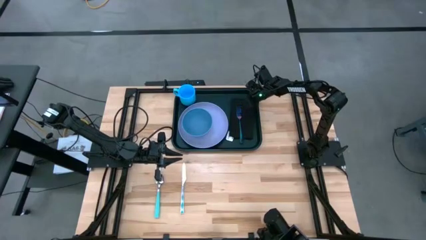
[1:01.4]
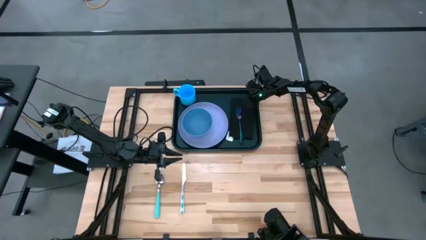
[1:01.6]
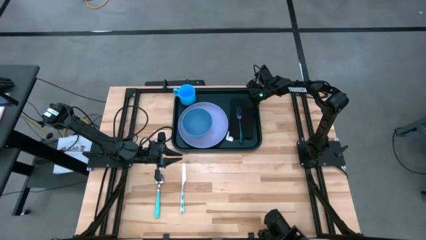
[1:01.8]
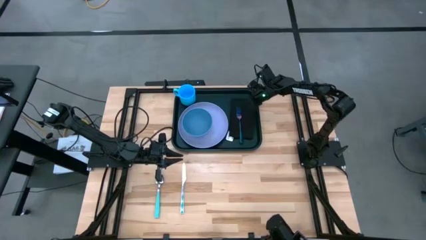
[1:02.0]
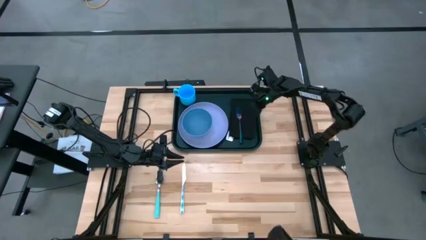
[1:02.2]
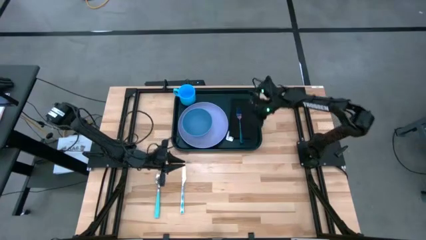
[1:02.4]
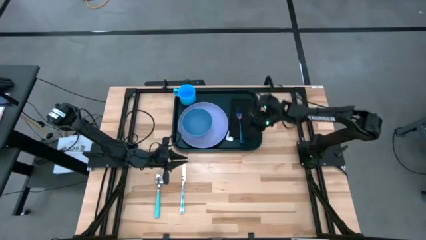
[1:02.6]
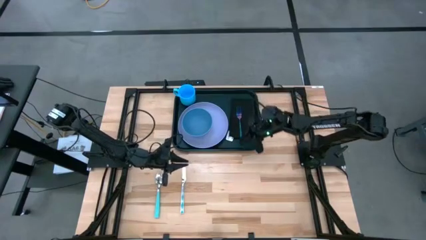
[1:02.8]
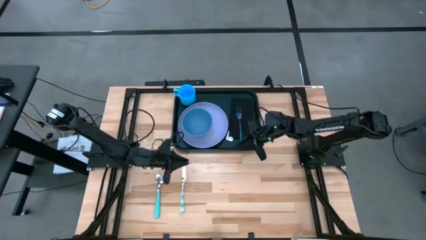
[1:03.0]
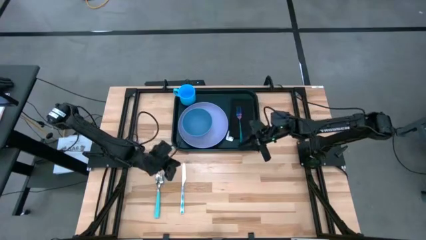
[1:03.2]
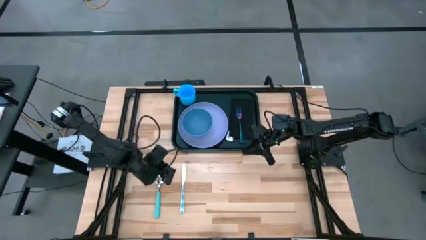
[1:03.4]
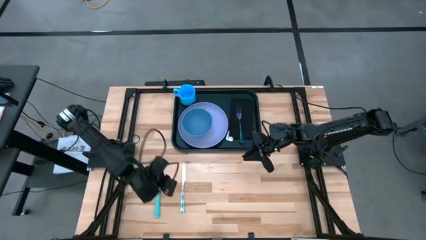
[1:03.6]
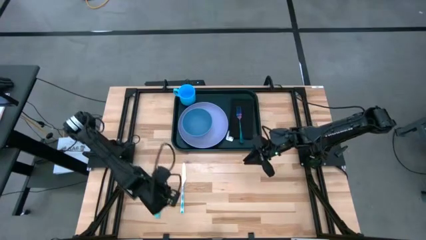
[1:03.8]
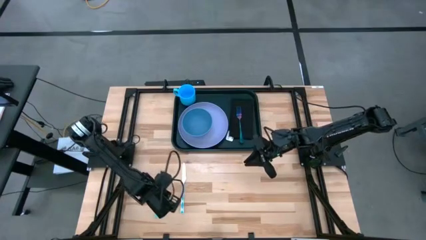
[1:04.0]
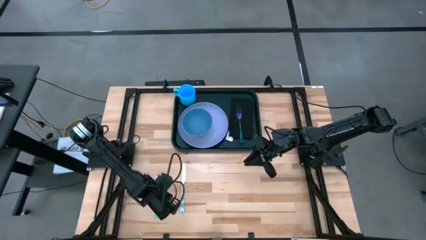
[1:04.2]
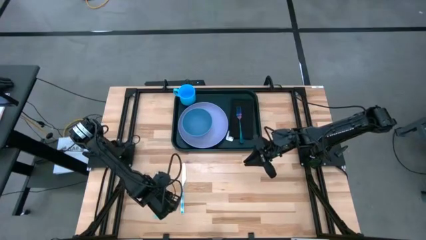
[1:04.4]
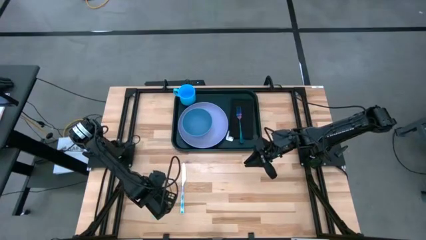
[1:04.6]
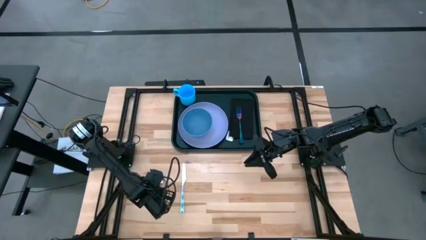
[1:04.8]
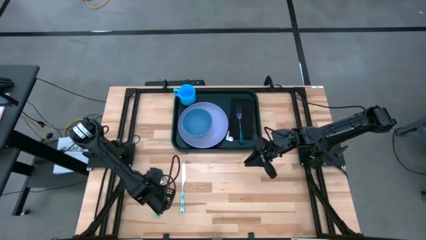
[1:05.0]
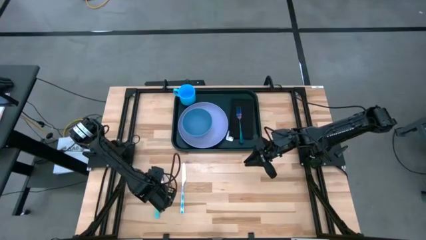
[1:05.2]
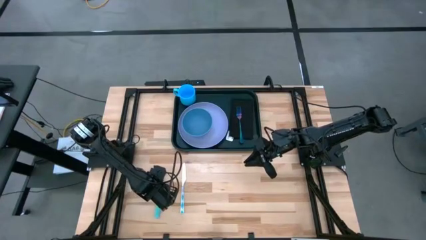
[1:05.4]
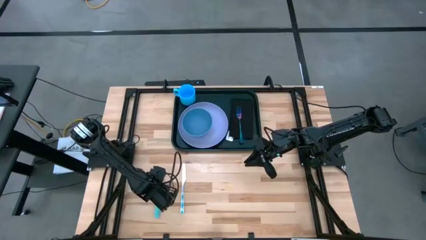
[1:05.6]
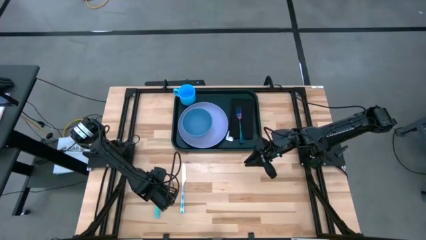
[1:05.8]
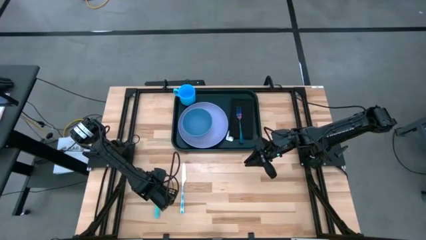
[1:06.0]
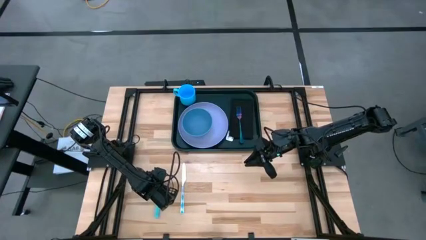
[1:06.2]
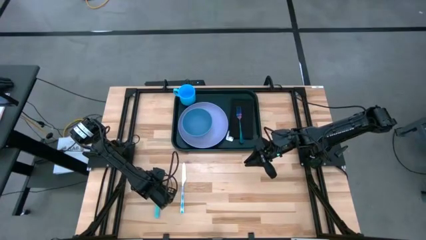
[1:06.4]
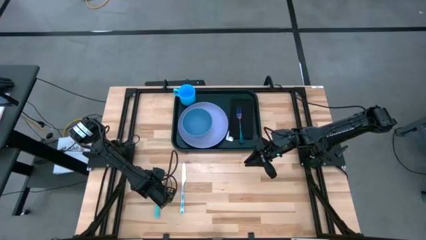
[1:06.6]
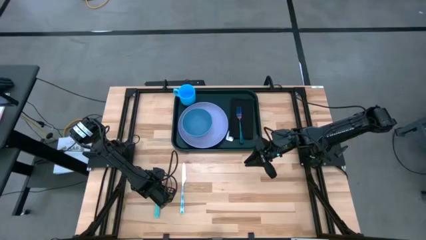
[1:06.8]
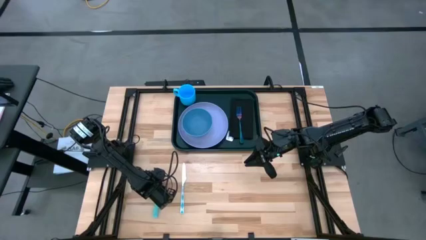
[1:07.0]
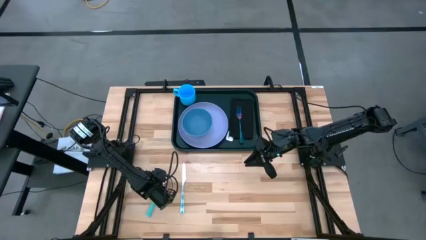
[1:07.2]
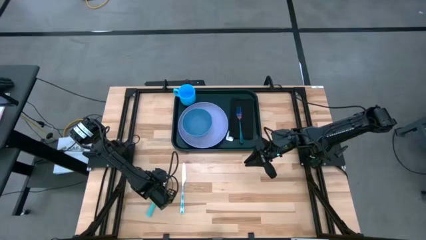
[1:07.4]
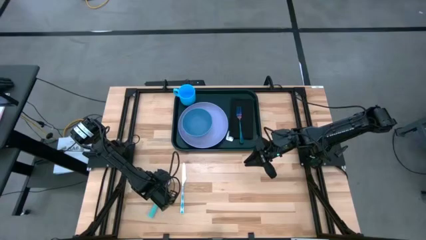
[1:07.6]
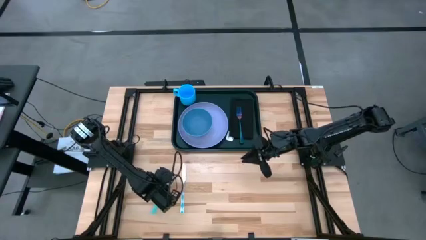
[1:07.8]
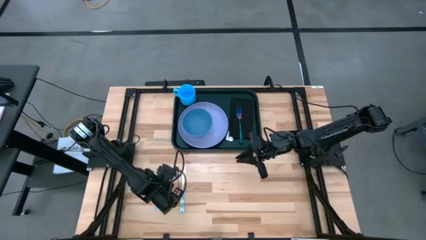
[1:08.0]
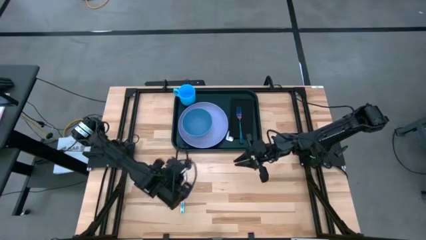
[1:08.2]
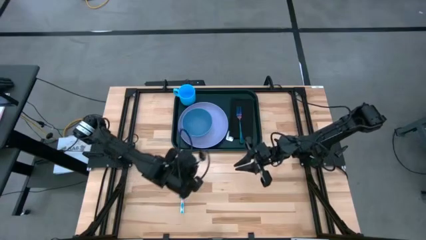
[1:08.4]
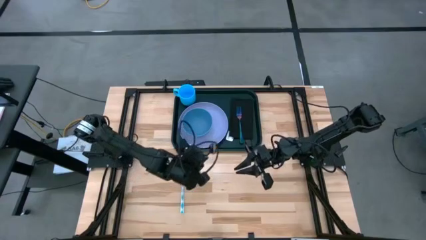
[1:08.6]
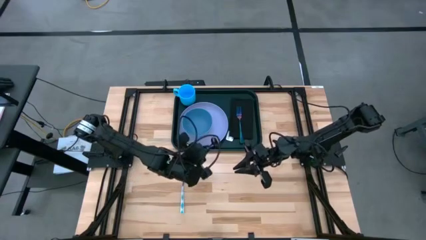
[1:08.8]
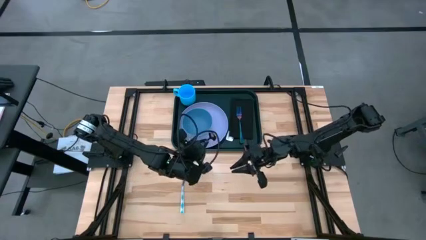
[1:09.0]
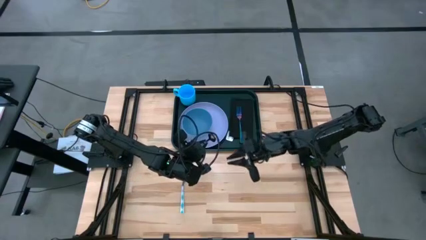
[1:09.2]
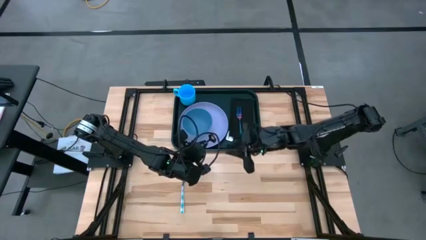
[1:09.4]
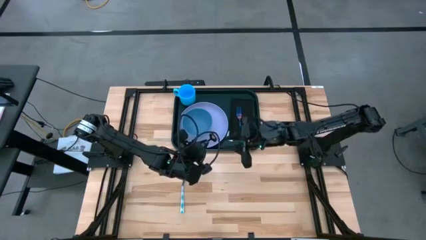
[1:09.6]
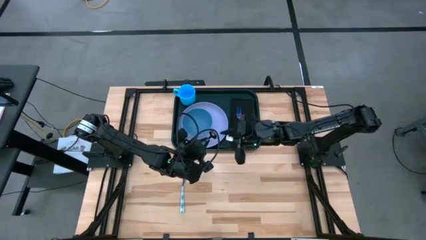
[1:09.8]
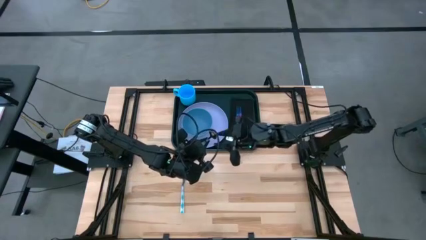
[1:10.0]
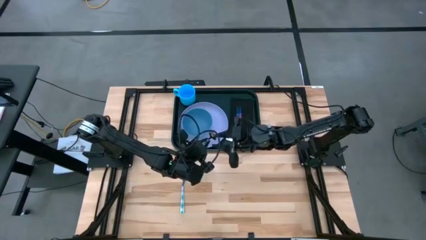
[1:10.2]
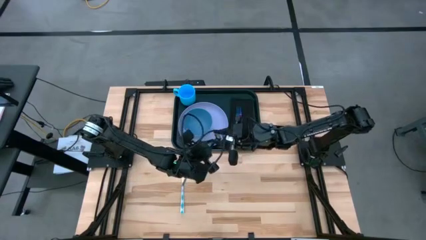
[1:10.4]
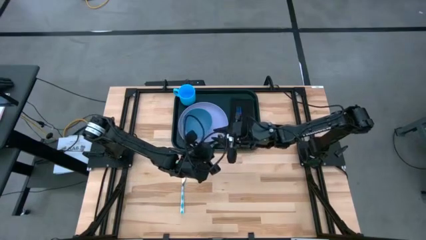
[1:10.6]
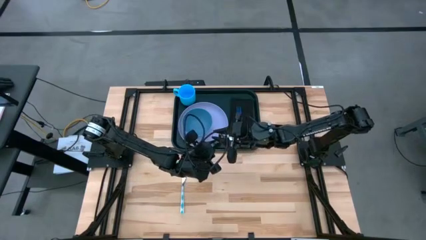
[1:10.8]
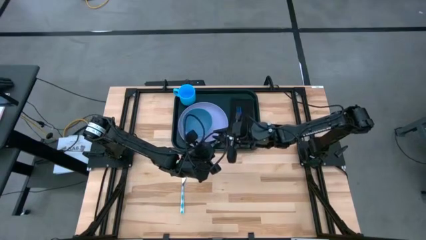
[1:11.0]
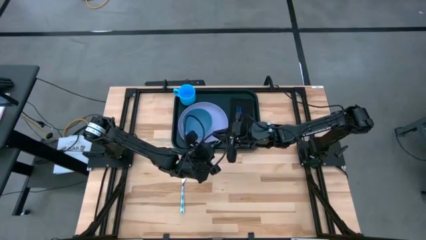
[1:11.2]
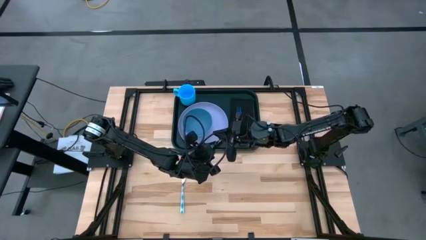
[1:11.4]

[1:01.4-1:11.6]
Task: Set up tray
Put the blue spoon on top of the black napkin to the left of the blue fork
